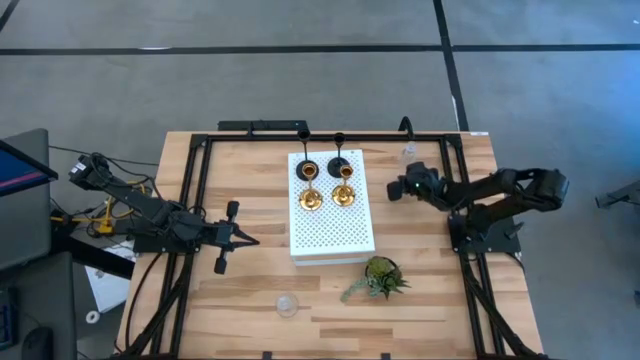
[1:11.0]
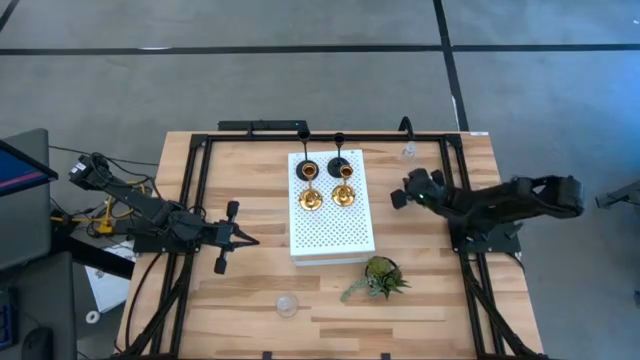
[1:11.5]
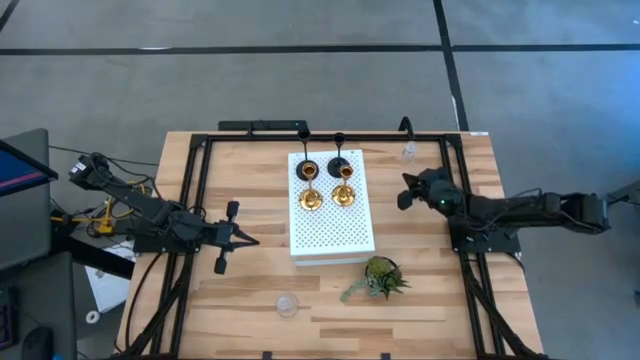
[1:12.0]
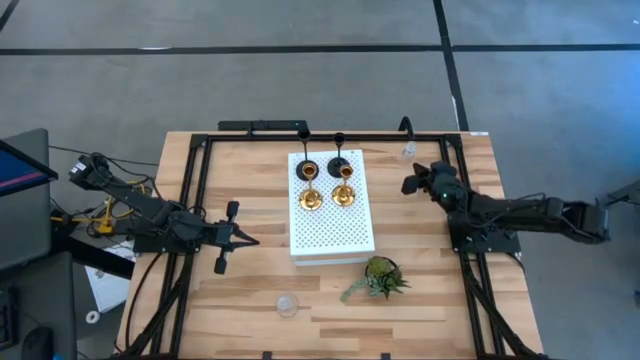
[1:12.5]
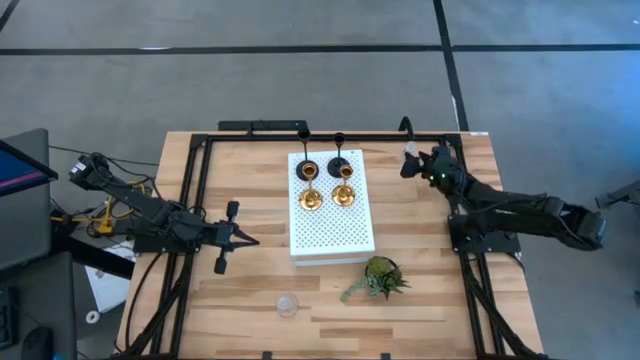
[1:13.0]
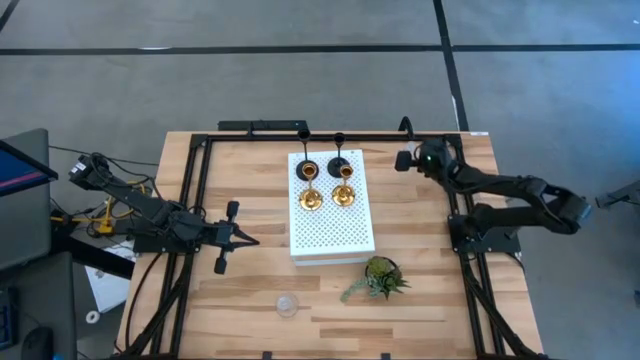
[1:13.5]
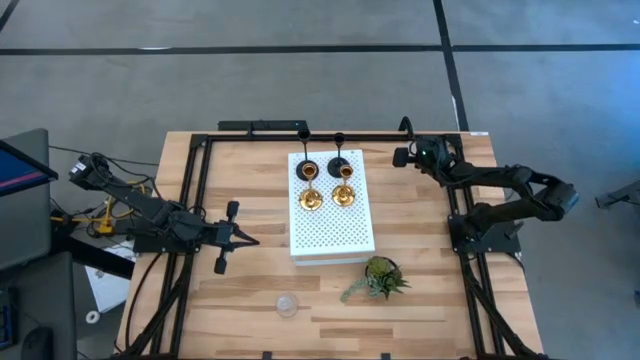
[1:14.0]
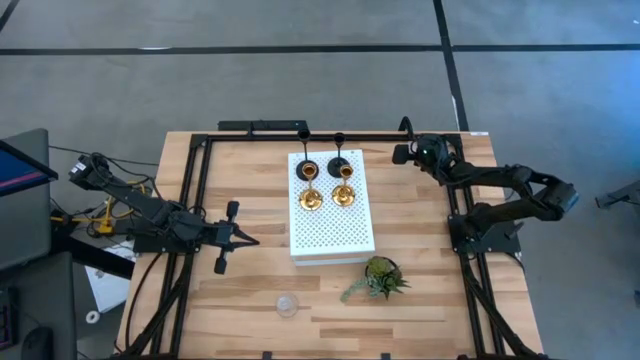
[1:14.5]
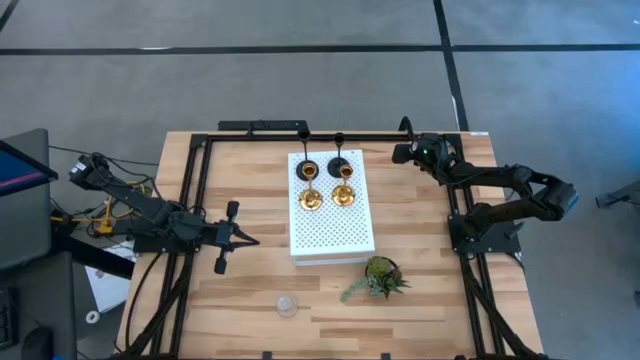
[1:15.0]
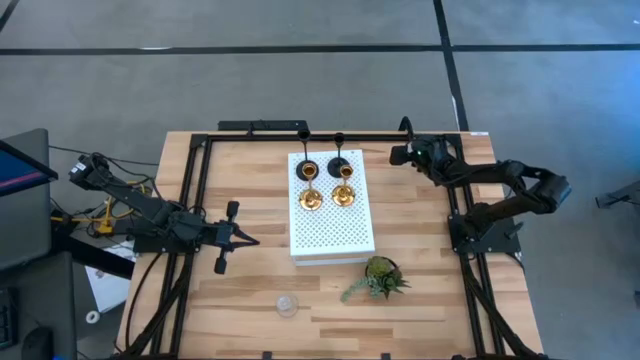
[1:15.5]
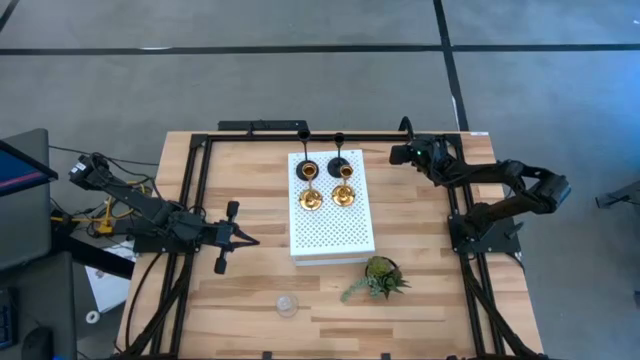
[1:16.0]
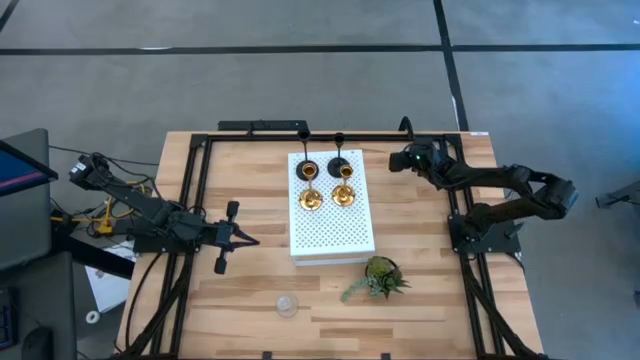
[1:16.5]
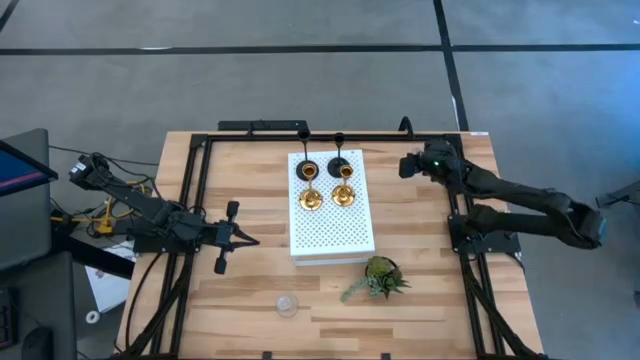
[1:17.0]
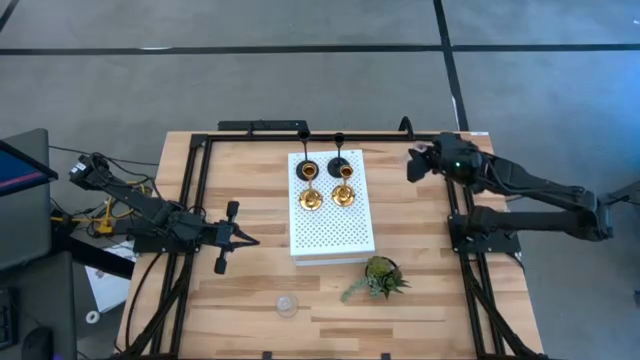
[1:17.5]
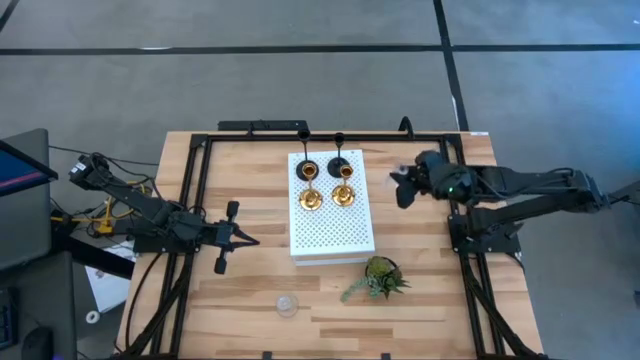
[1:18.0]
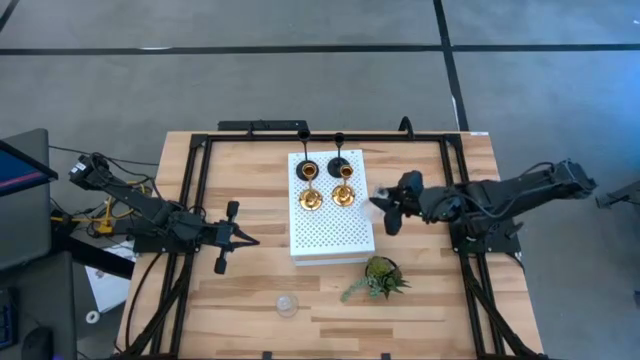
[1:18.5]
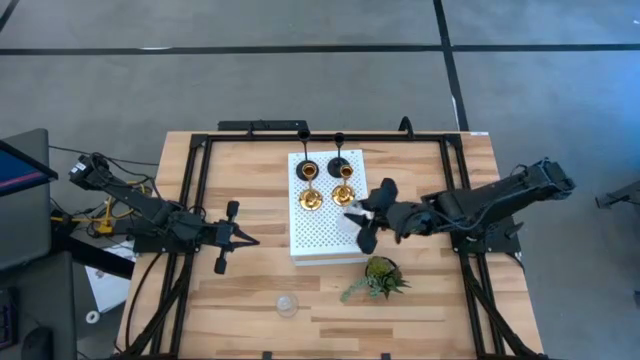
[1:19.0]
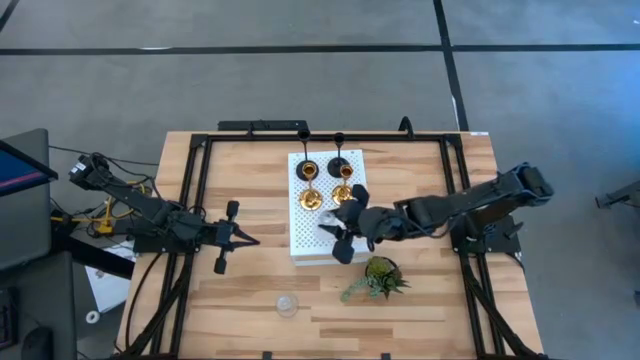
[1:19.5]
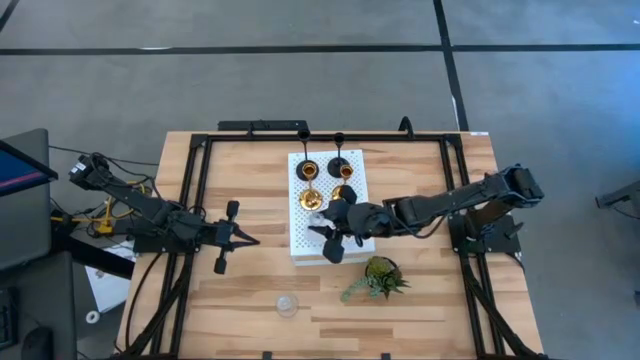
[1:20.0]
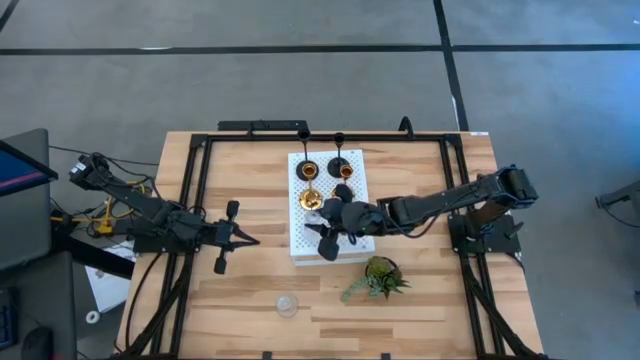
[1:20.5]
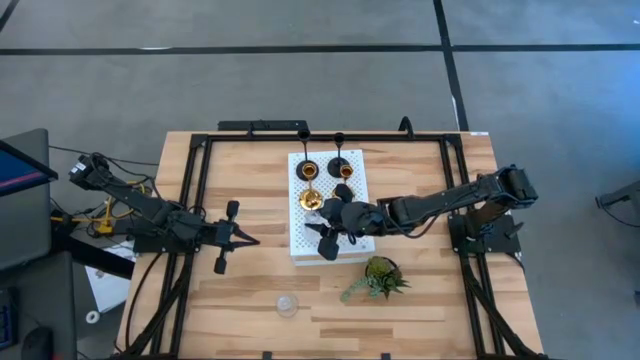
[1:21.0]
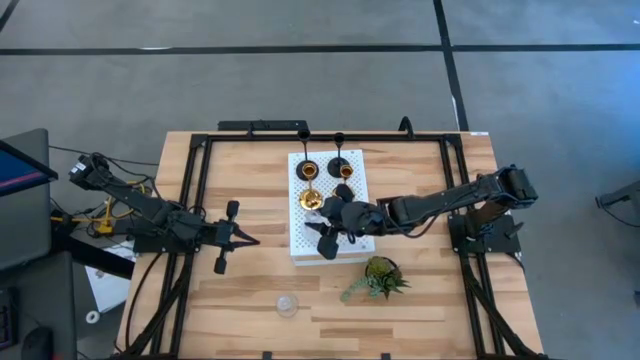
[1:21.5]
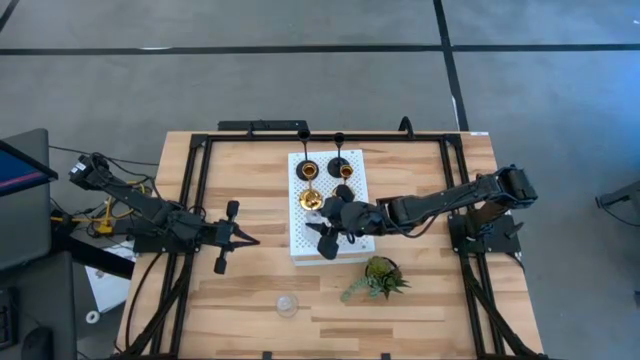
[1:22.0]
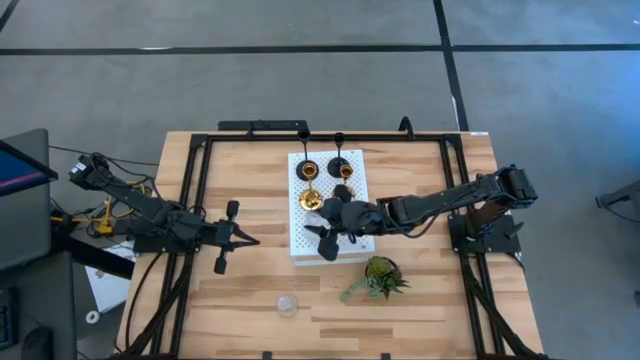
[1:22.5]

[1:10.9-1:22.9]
Task: Pick & Place candle stick holders
Put the top glass candle holder on the shelf

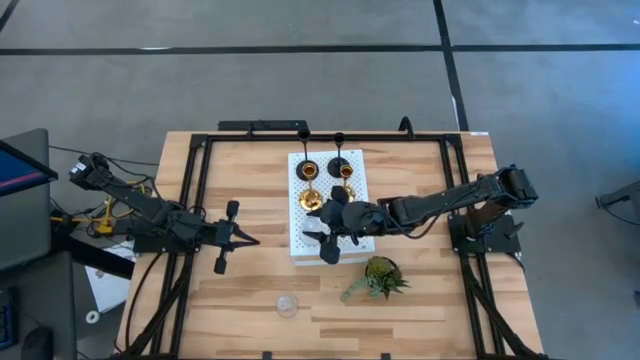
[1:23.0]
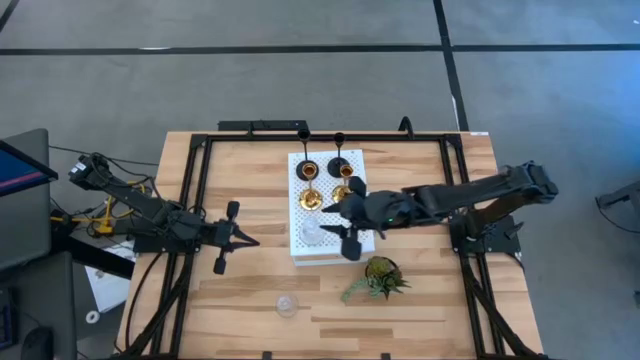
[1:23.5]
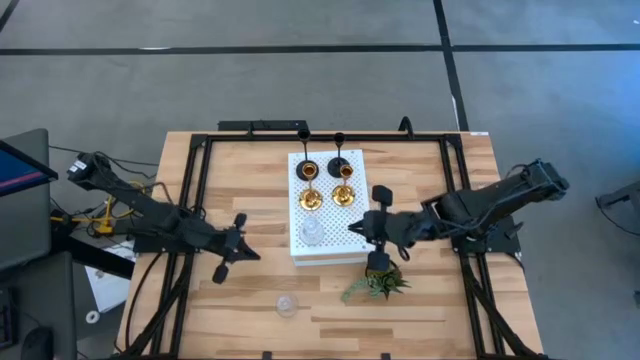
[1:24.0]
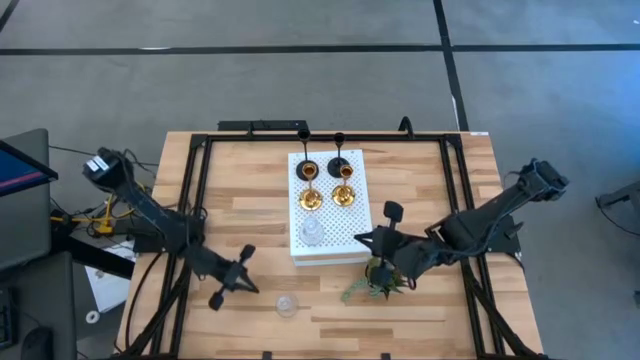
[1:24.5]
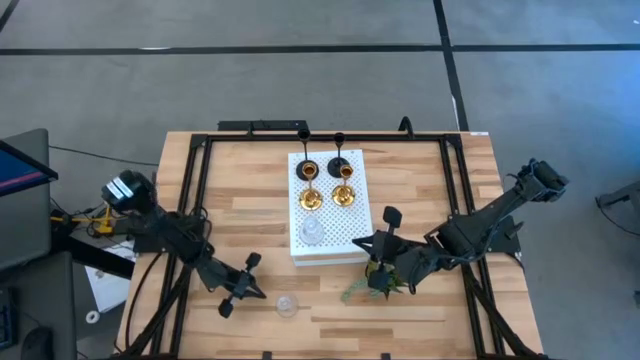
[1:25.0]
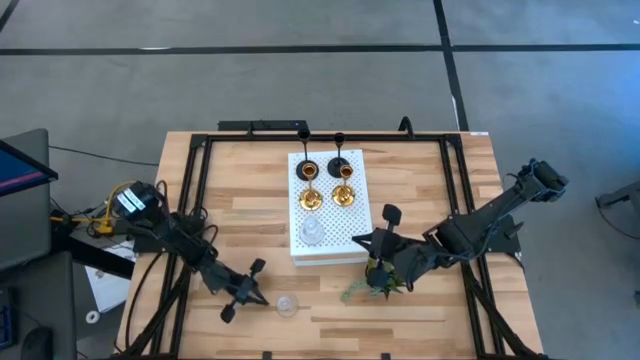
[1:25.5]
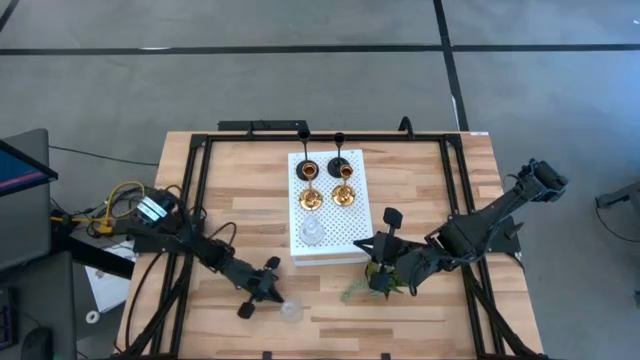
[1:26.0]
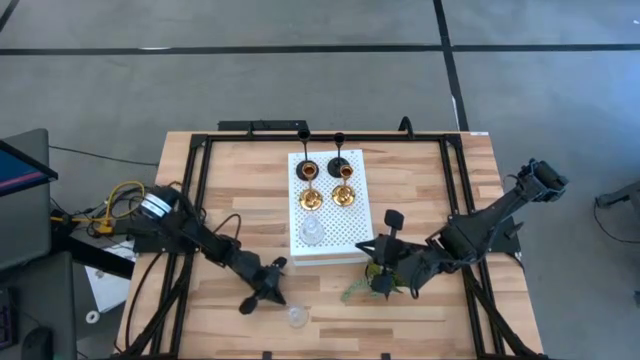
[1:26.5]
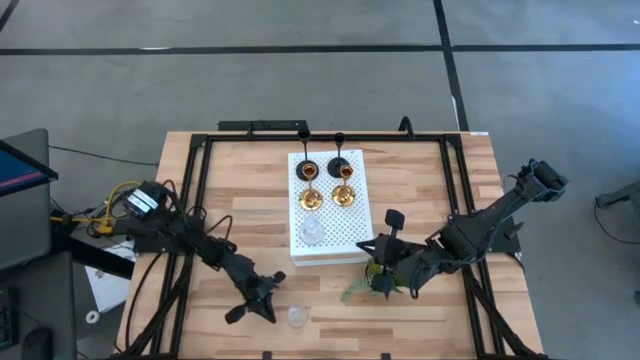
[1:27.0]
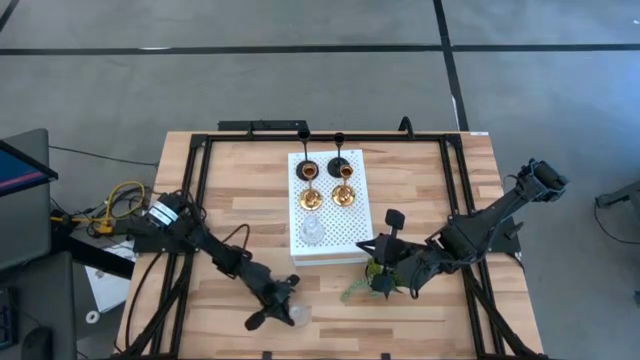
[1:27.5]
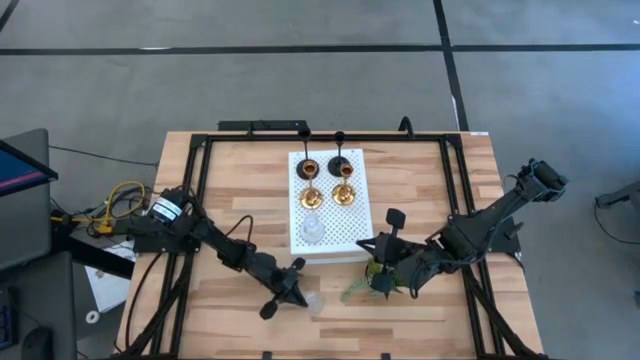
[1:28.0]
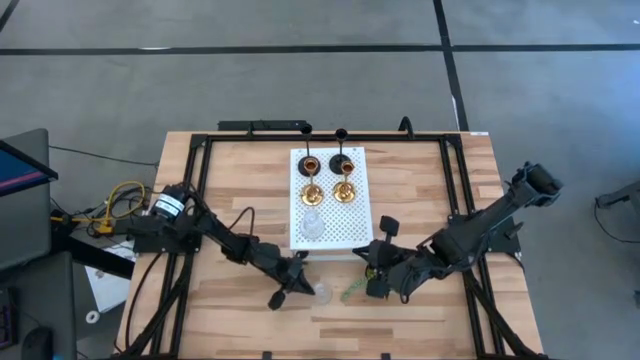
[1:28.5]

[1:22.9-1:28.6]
Move the glass candle holder to the bottom middle of the table

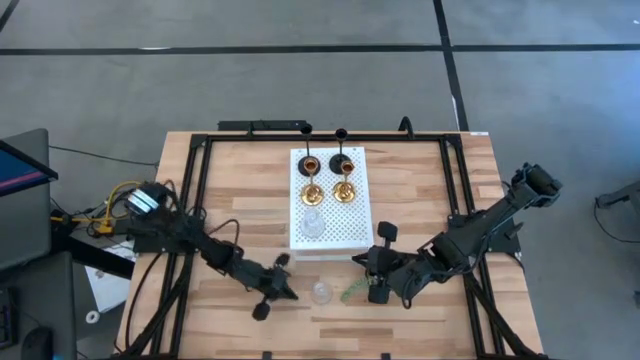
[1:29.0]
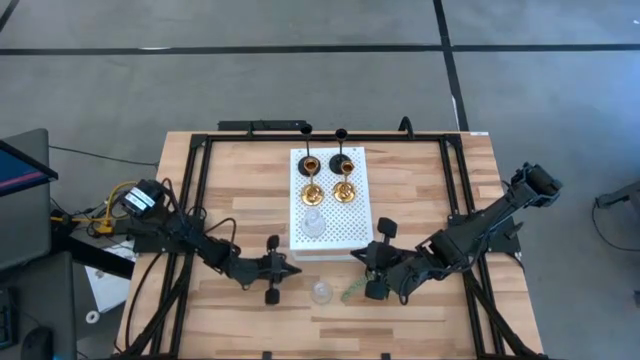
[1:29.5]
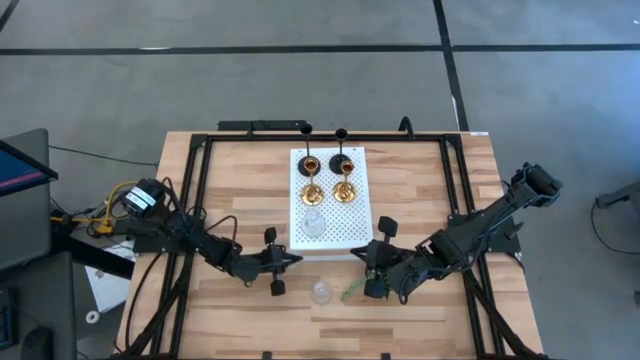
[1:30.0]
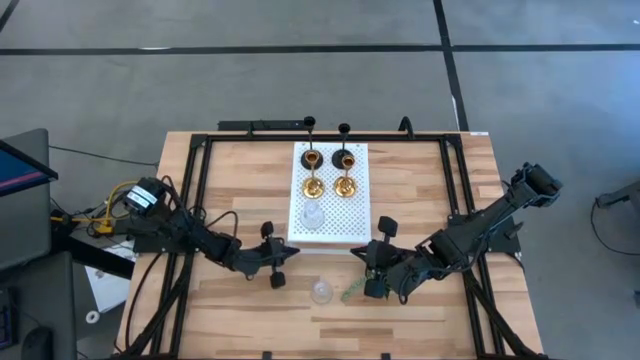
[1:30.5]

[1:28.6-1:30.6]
Adjust the shelf on the table

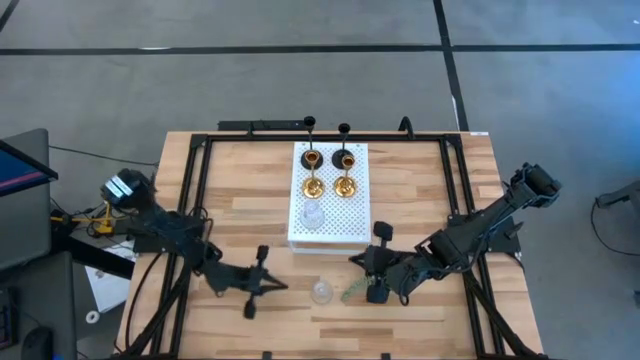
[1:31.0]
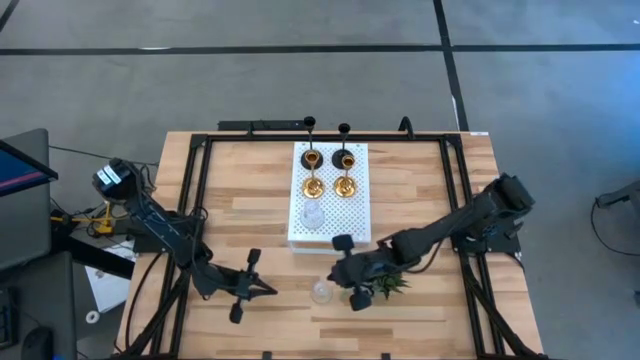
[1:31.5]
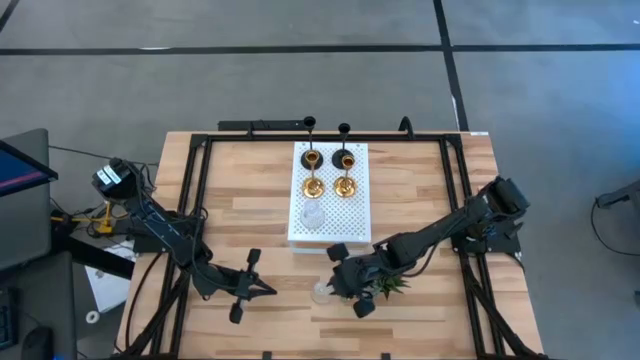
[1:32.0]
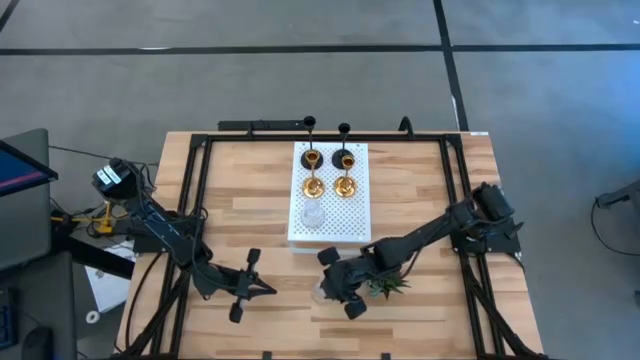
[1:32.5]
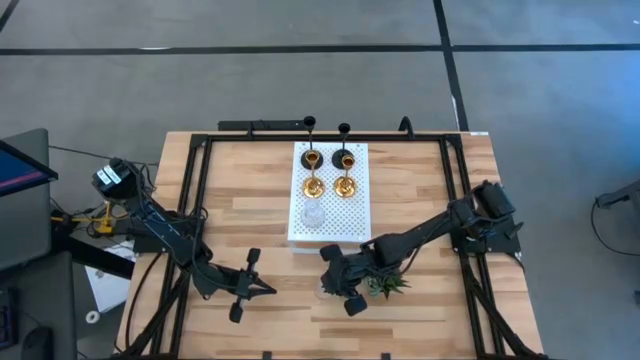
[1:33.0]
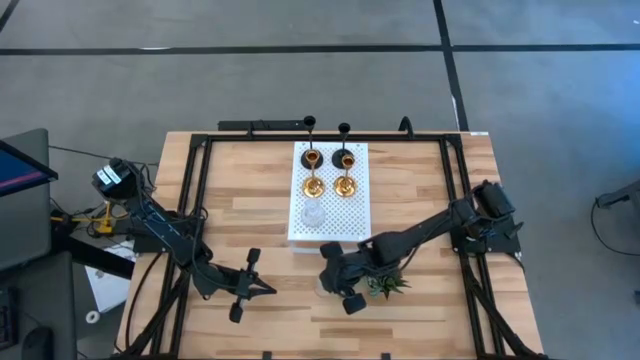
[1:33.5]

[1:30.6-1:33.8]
Put the glass candle holder on the shelf
